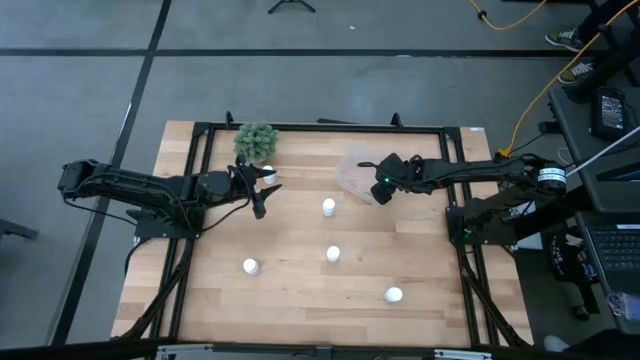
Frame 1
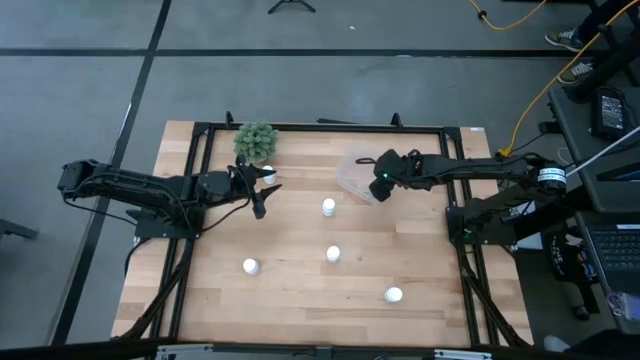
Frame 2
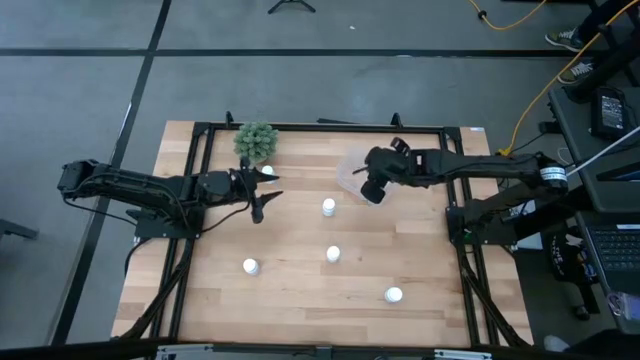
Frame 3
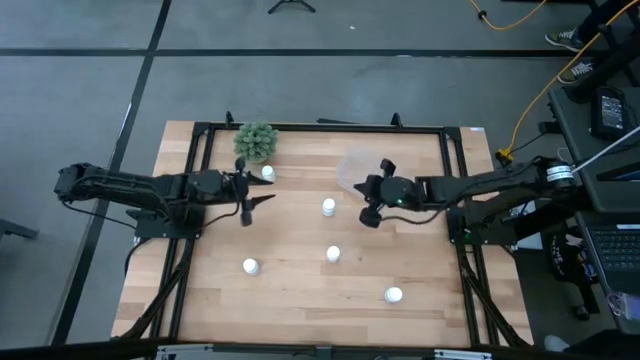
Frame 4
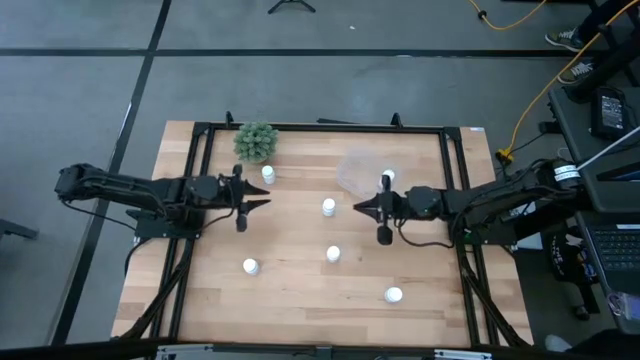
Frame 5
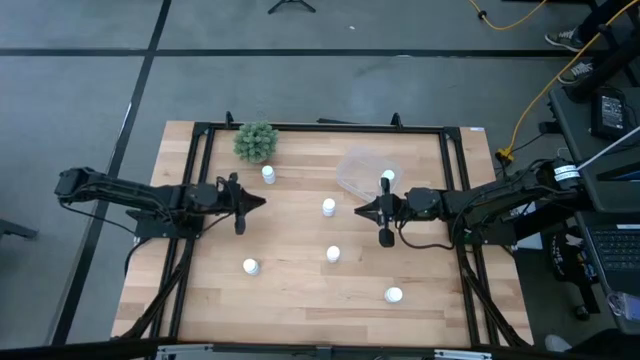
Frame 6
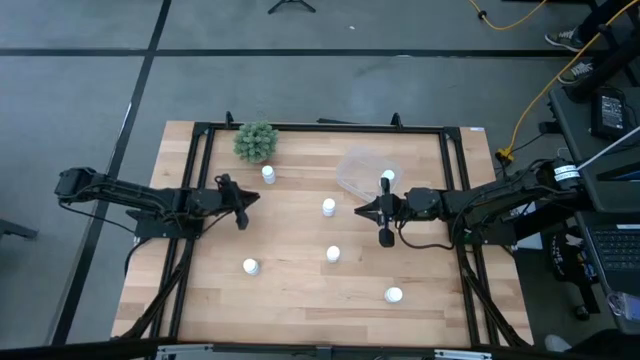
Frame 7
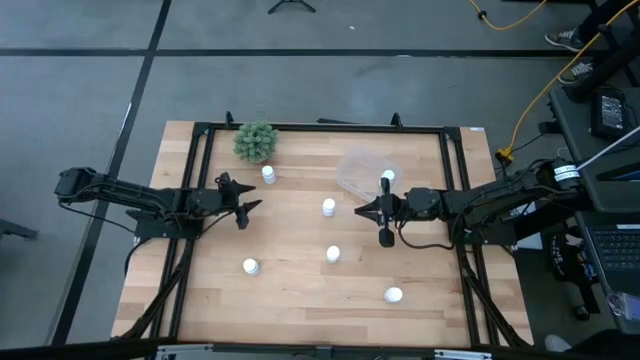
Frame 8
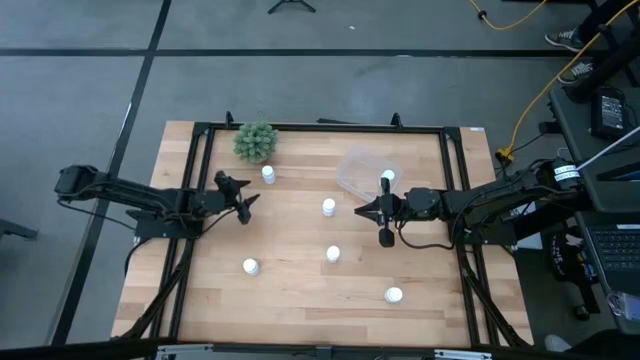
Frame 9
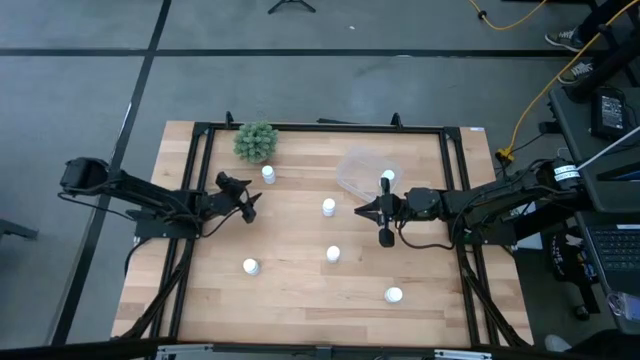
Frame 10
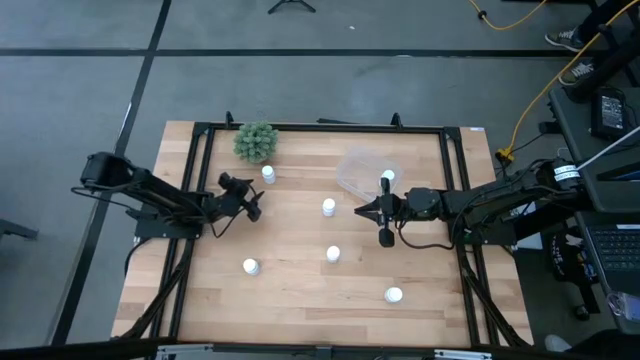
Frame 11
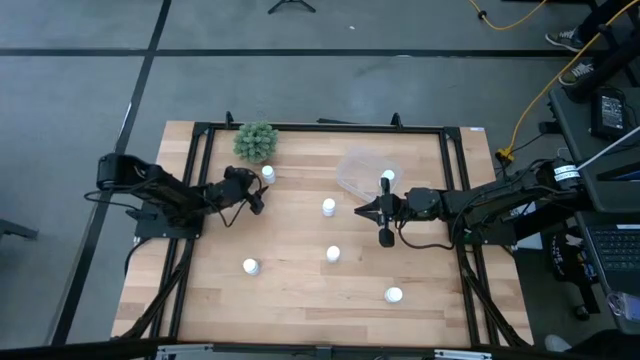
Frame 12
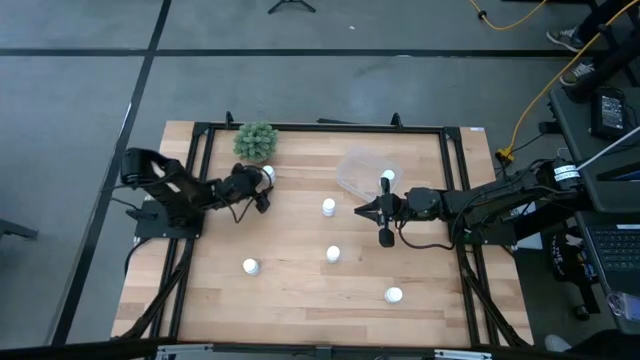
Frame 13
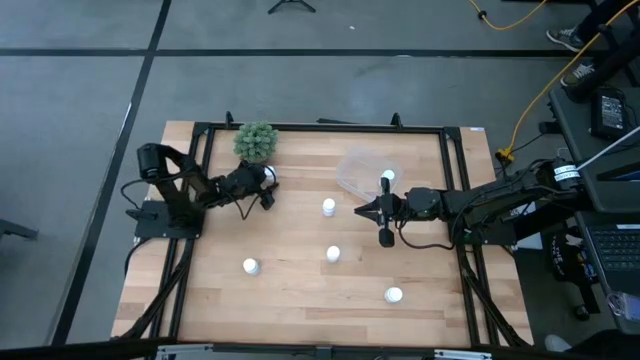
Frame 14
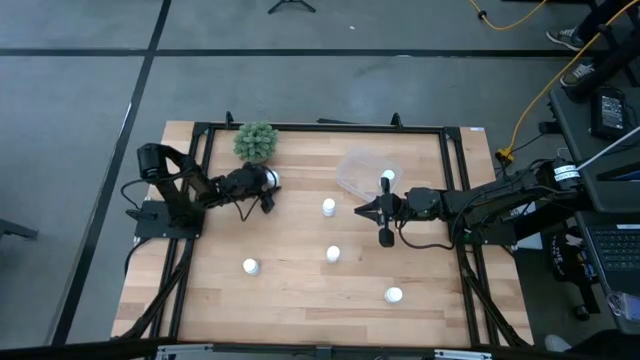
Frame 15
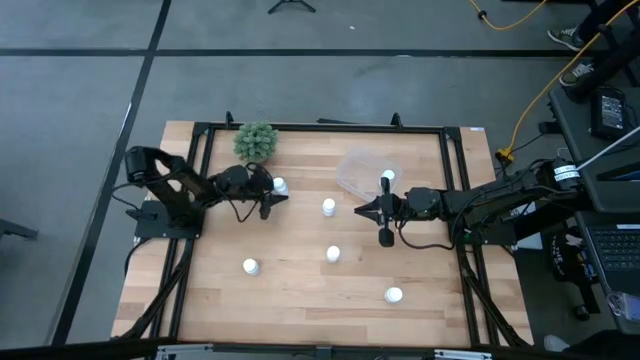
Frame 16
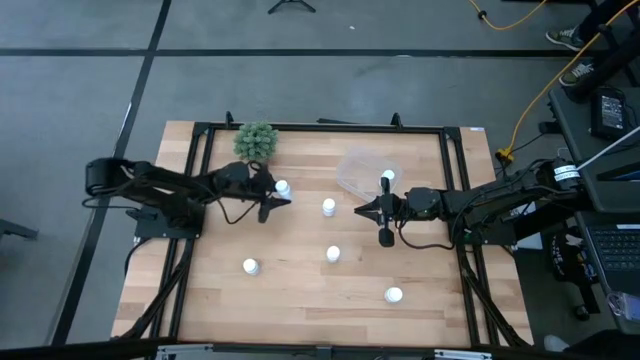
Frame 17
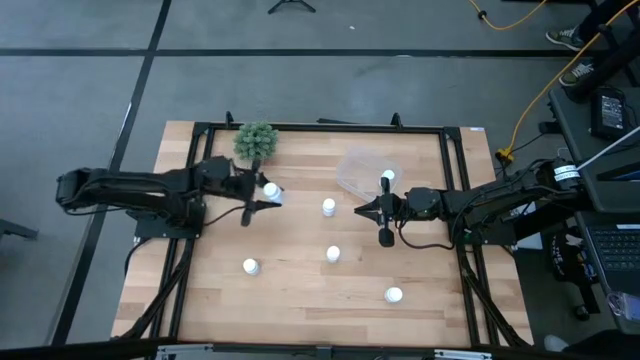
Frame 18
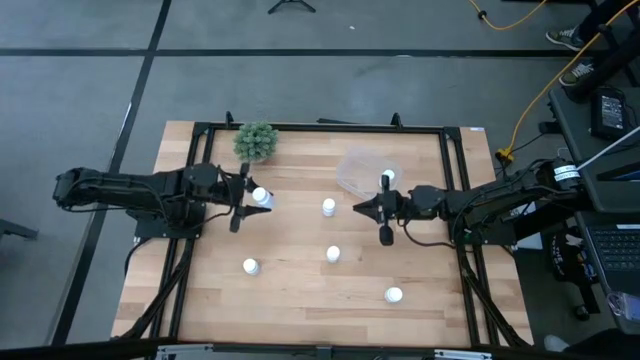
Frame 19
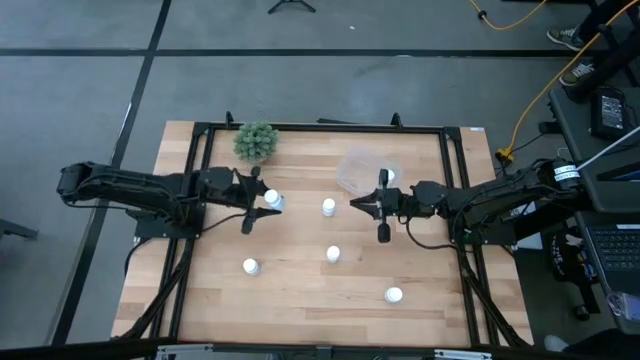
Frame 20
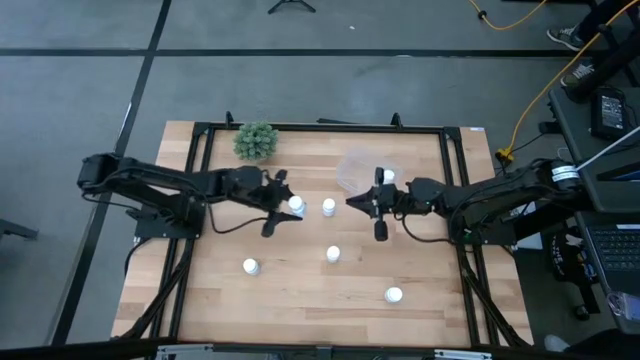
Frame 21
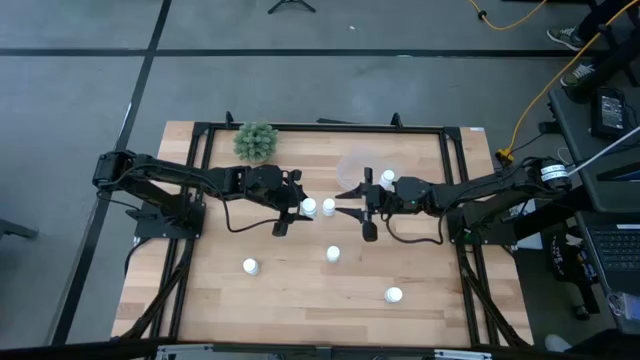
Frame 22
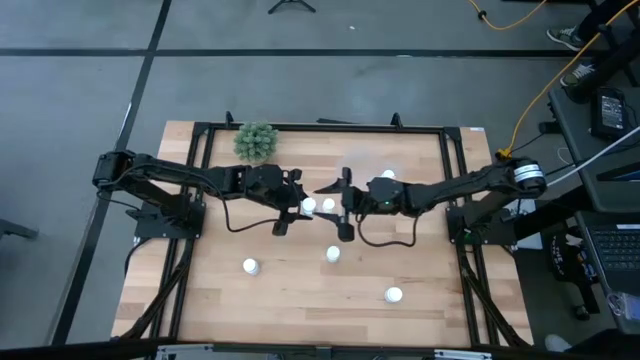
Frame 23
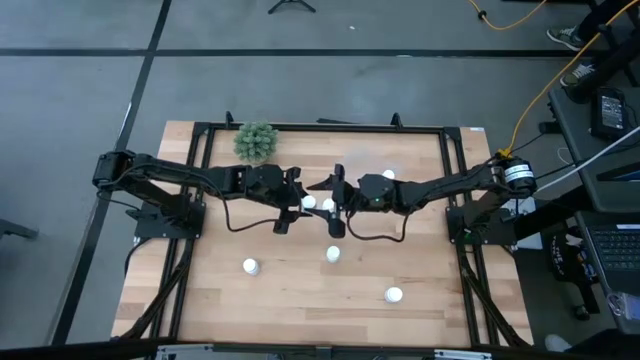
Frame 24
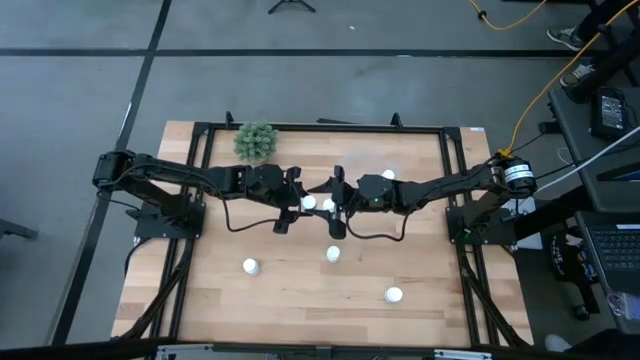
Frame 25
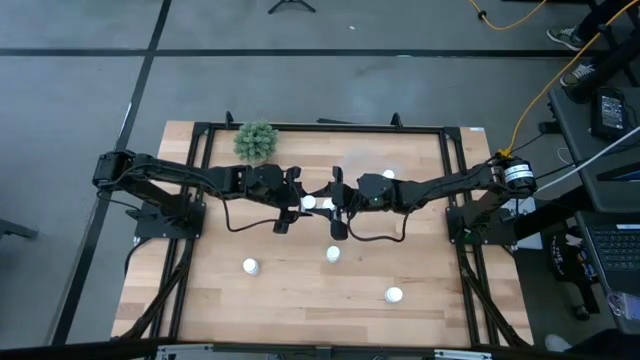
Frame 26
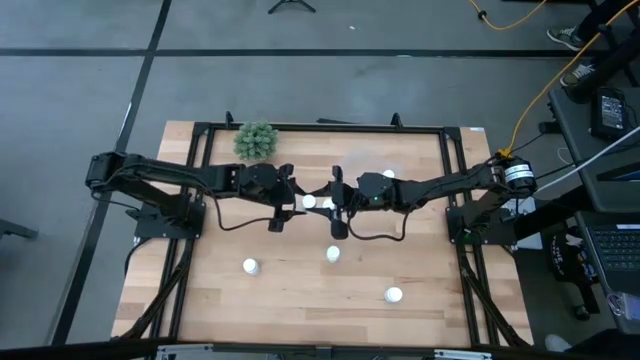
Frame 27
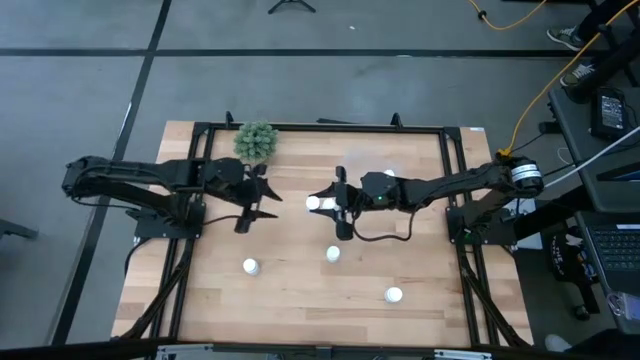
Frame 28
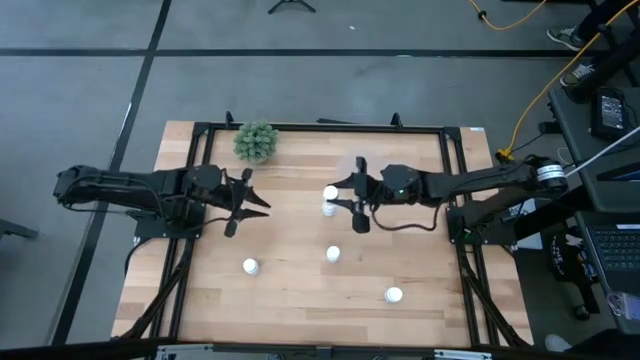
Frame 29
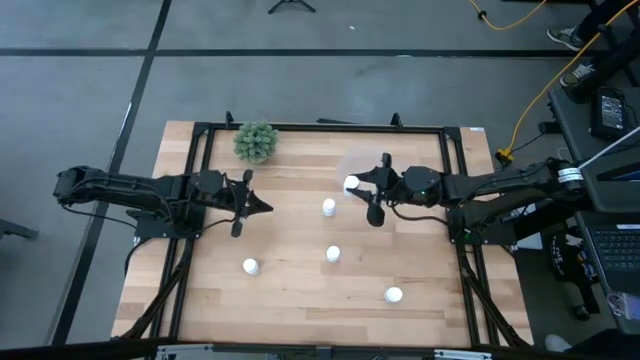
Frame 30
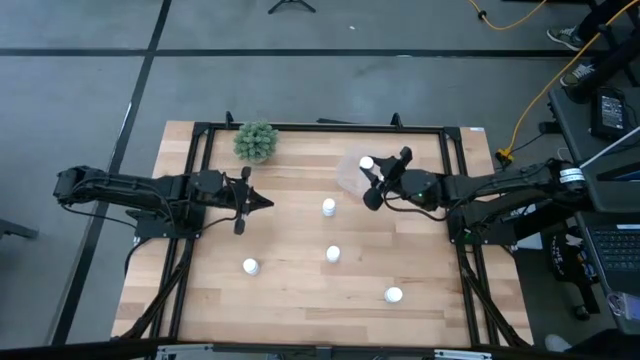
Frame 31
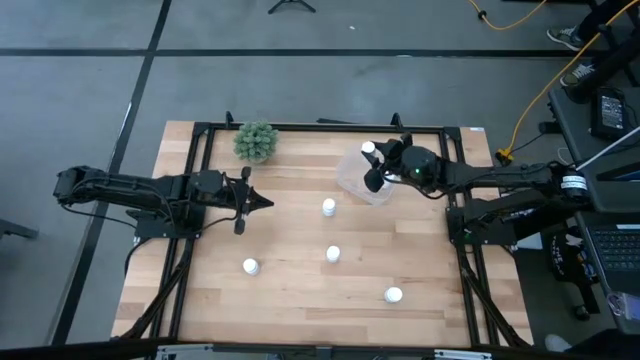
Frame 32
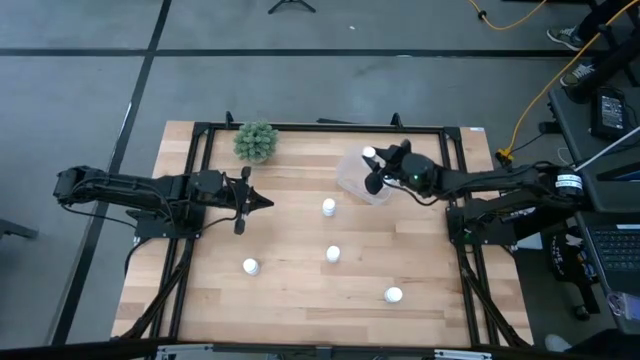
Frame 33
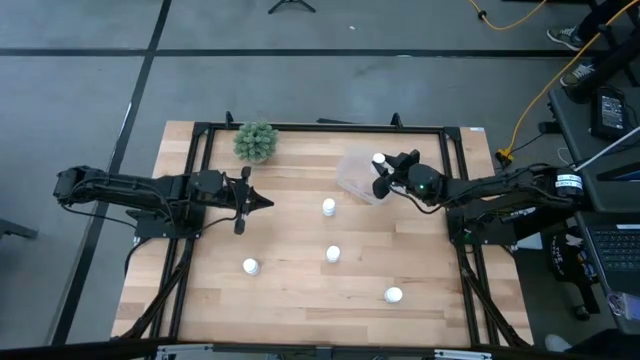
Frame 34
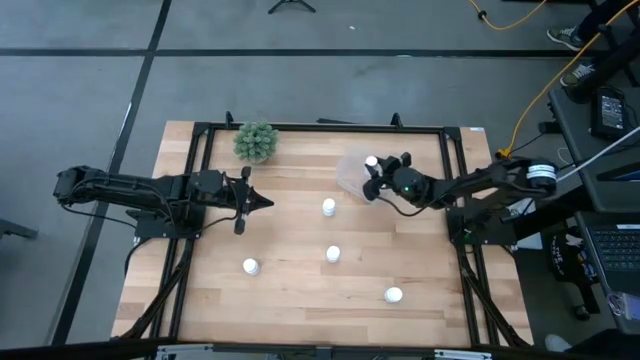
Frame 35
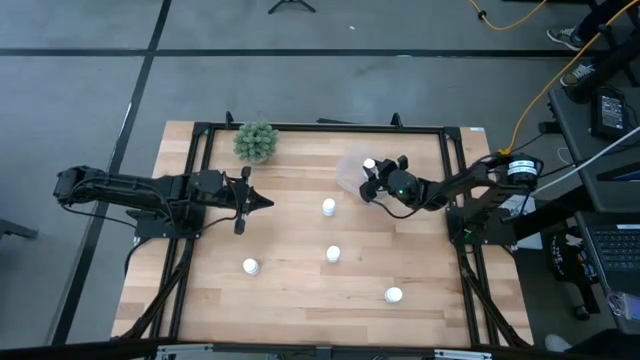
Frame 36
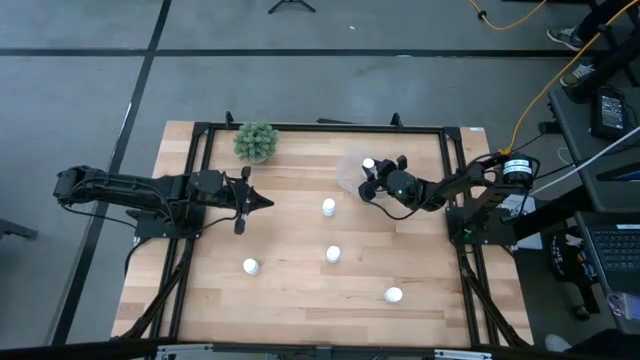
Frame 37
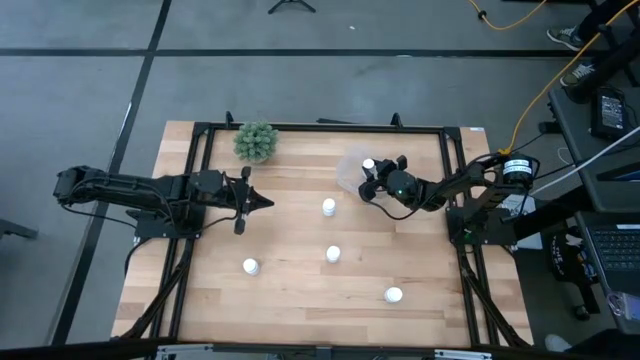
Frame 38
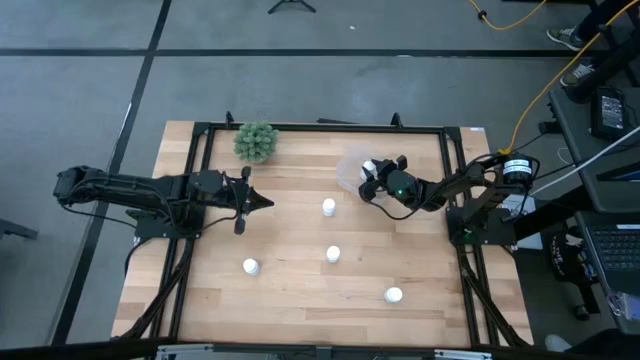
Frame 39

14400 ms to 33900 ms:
Task: Pick and place pill bottles into a basket
Put the white pill bottle into the transparent bin

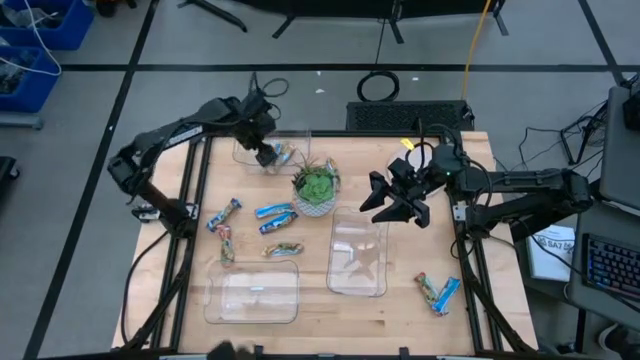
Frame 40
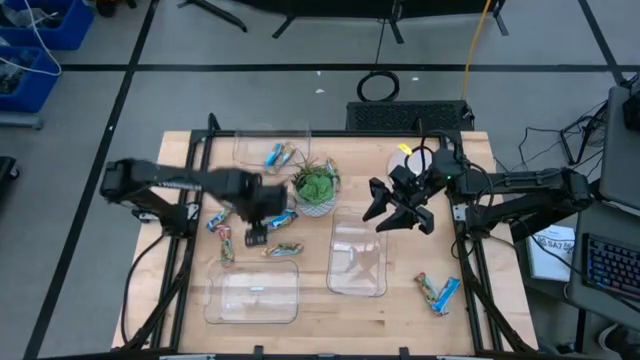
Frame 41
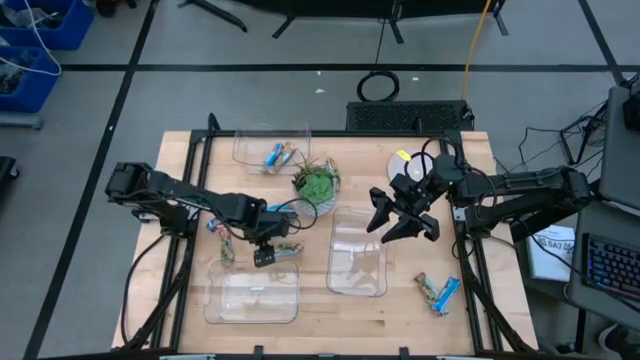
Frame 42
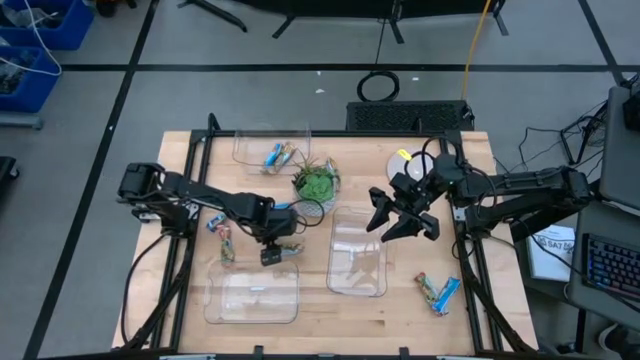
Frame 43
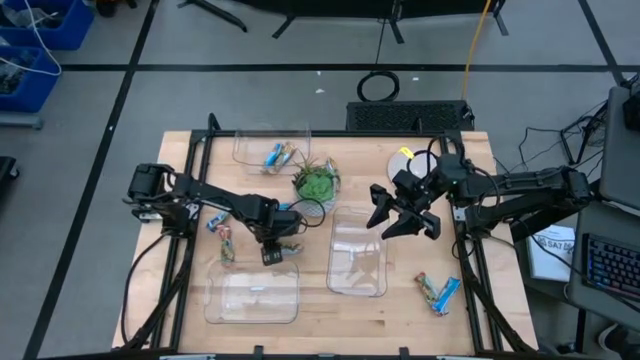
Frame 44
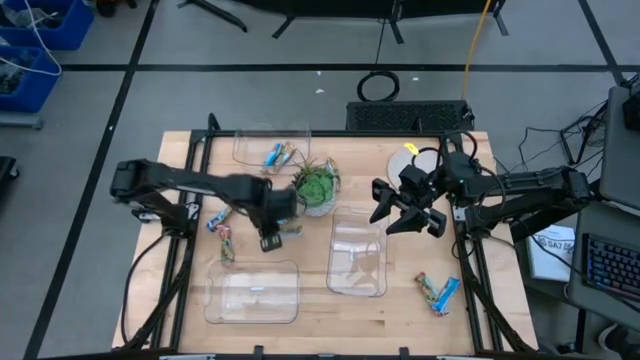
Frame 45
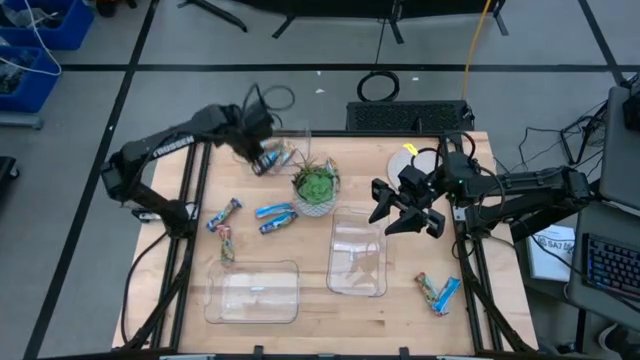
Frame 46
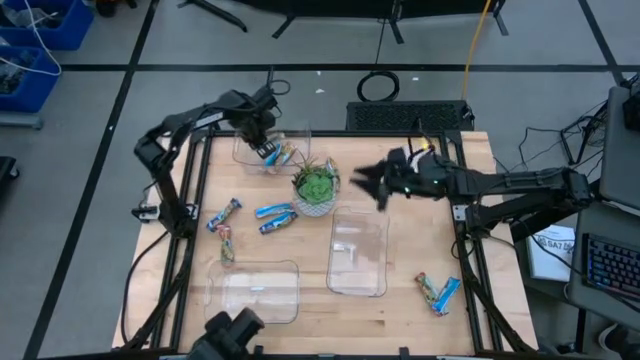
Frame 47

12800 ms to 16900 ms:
Task: Pick and place Granola Bars by type
Put the bottom yellow granola bar into the top transparent bin
